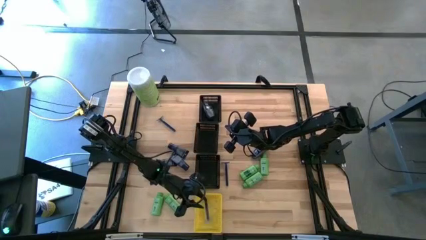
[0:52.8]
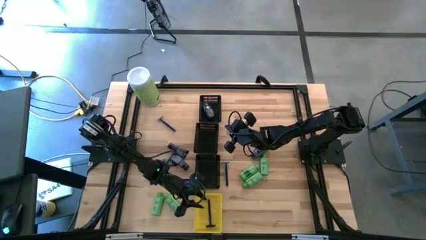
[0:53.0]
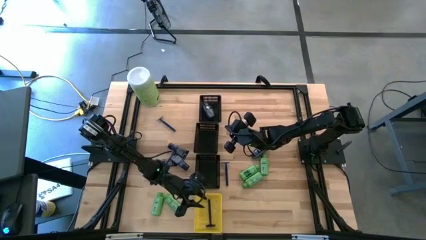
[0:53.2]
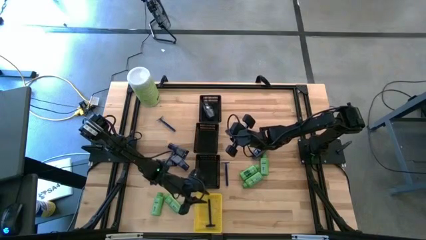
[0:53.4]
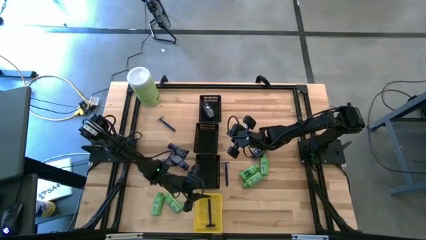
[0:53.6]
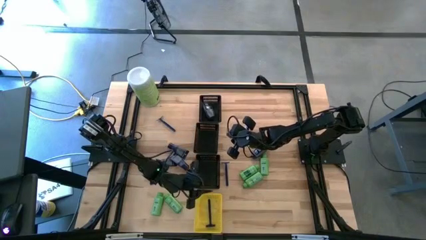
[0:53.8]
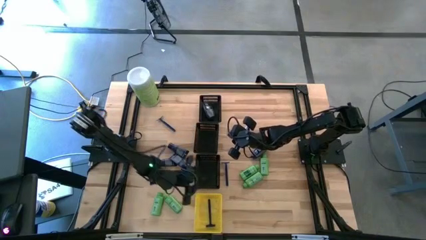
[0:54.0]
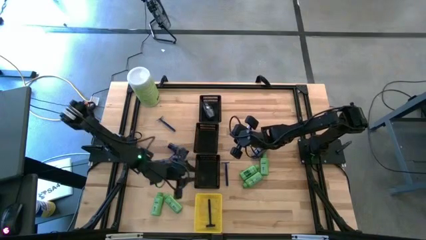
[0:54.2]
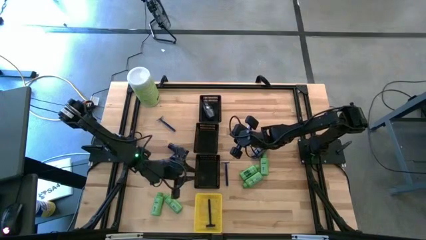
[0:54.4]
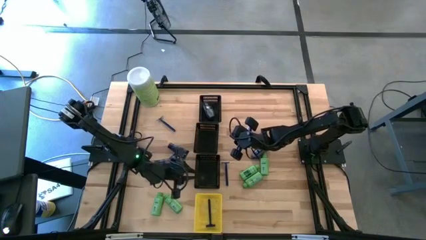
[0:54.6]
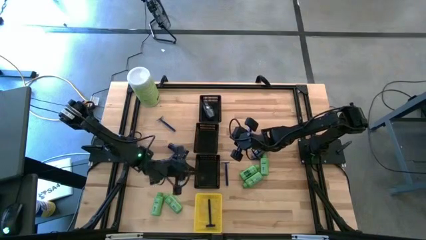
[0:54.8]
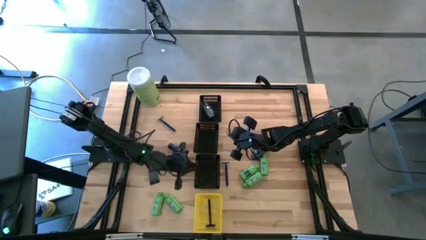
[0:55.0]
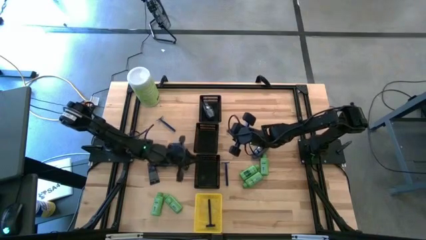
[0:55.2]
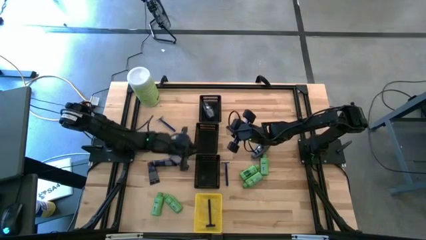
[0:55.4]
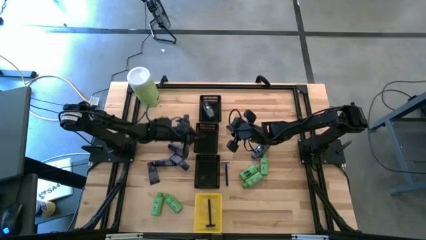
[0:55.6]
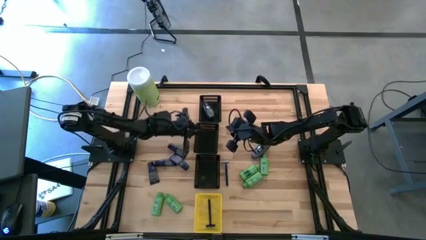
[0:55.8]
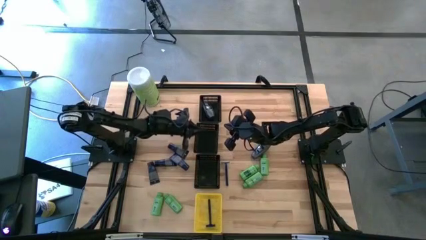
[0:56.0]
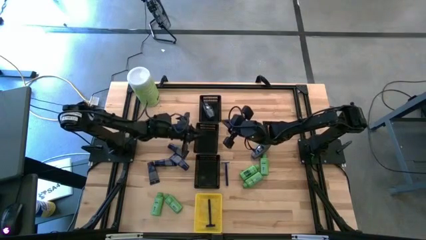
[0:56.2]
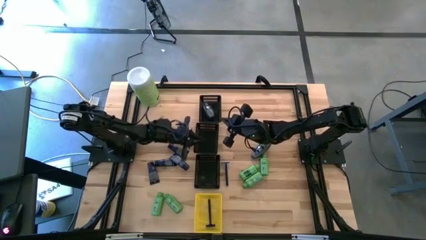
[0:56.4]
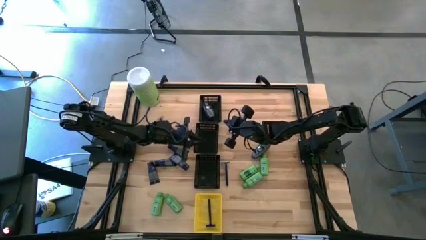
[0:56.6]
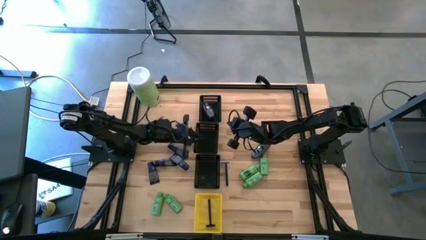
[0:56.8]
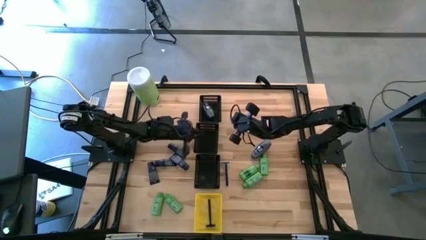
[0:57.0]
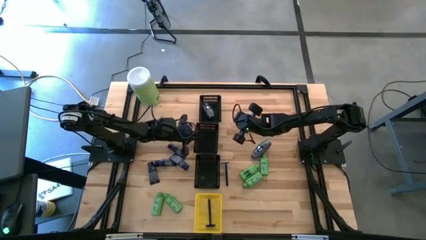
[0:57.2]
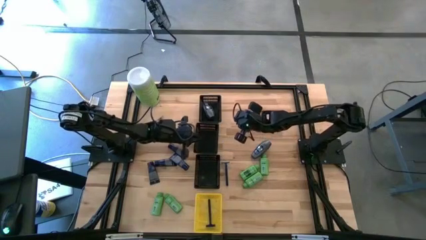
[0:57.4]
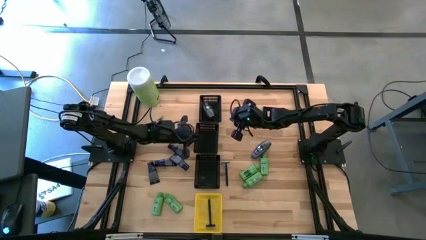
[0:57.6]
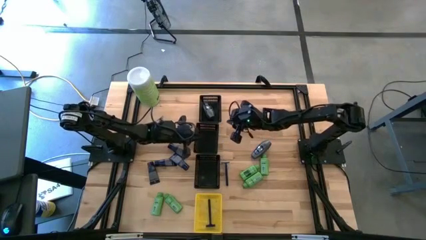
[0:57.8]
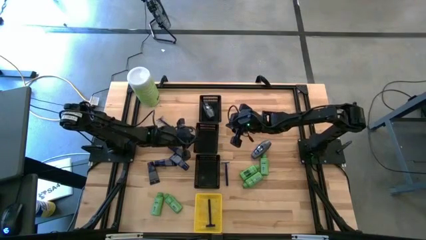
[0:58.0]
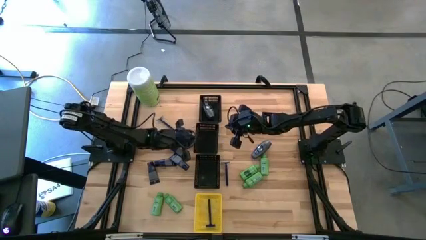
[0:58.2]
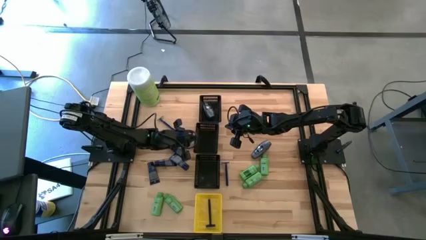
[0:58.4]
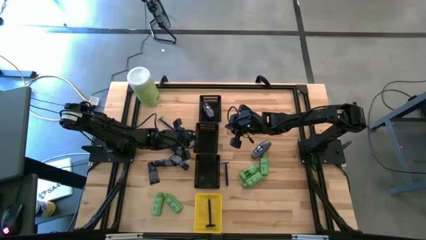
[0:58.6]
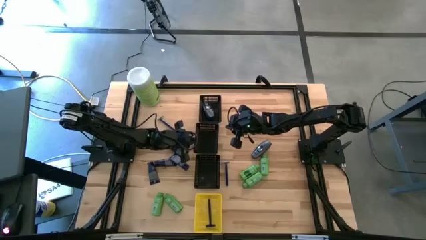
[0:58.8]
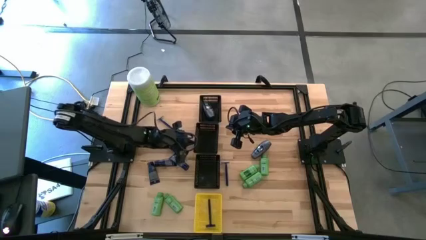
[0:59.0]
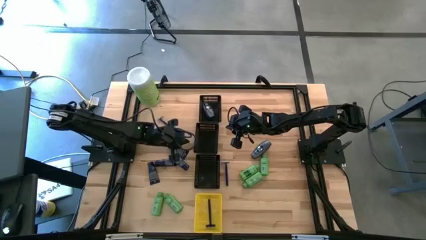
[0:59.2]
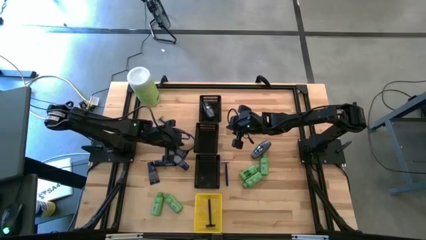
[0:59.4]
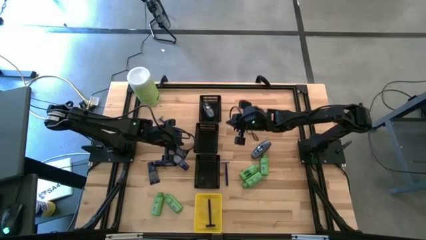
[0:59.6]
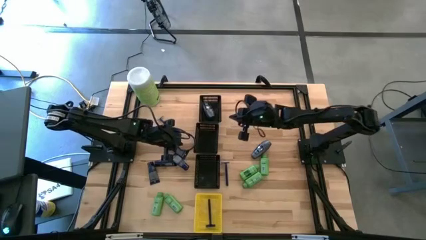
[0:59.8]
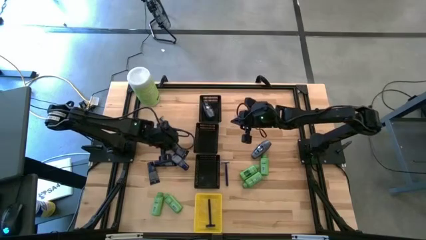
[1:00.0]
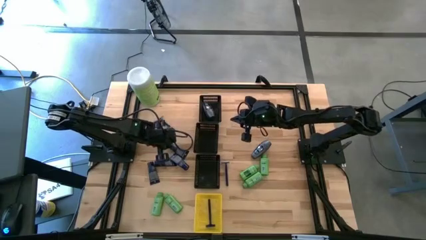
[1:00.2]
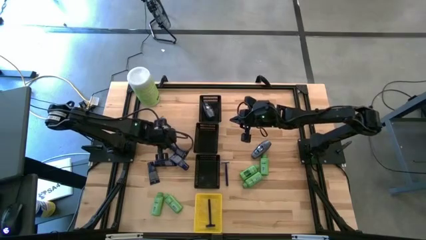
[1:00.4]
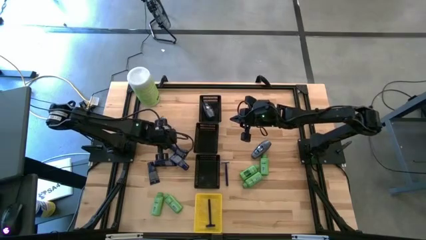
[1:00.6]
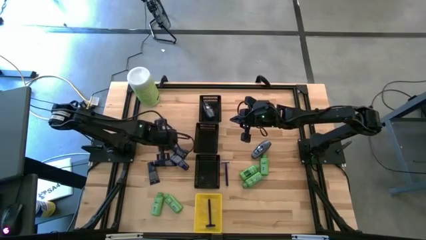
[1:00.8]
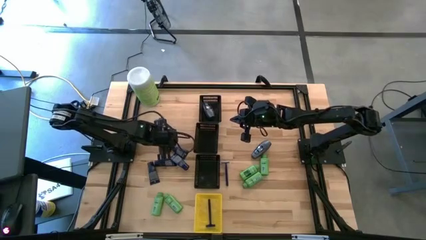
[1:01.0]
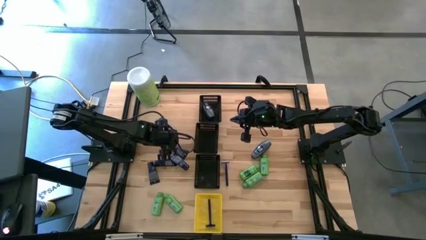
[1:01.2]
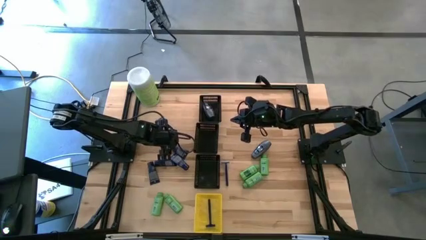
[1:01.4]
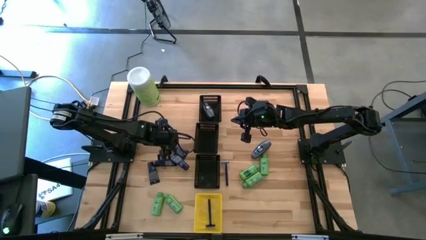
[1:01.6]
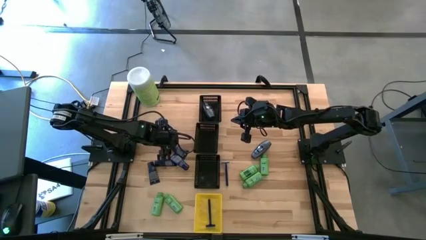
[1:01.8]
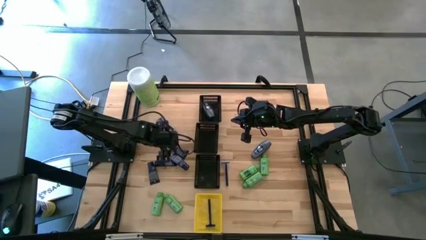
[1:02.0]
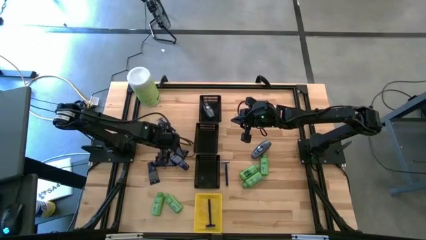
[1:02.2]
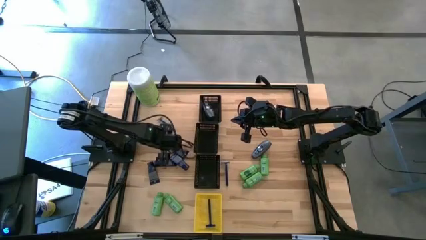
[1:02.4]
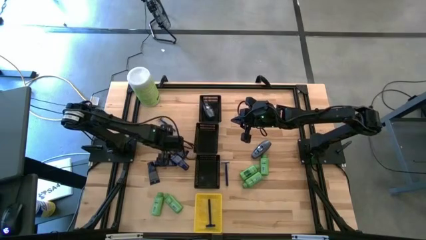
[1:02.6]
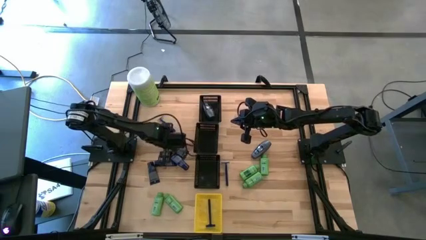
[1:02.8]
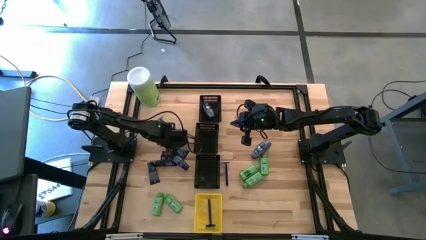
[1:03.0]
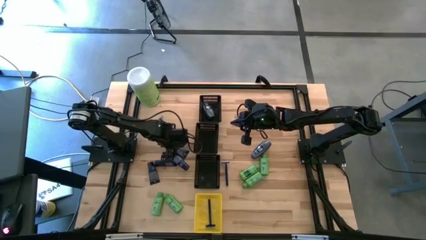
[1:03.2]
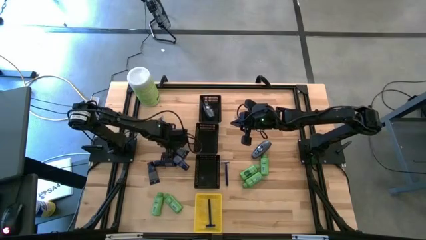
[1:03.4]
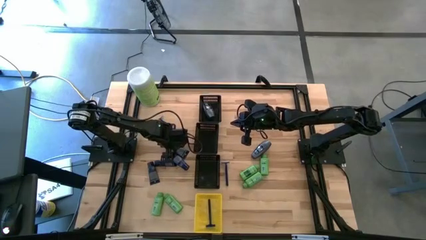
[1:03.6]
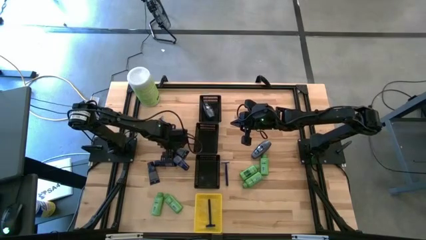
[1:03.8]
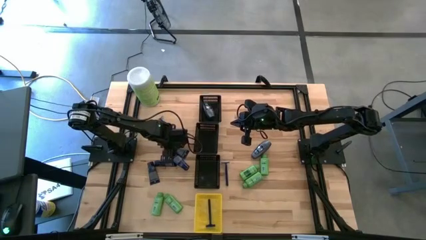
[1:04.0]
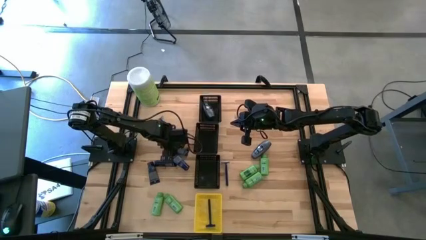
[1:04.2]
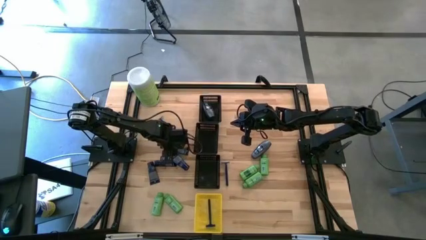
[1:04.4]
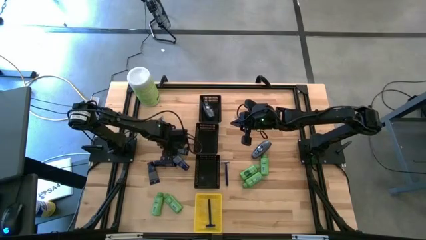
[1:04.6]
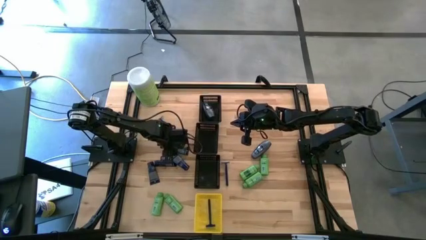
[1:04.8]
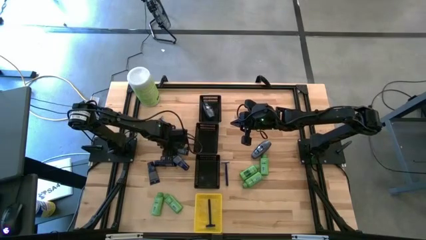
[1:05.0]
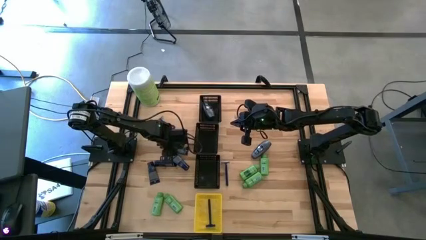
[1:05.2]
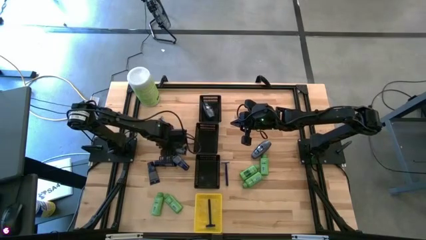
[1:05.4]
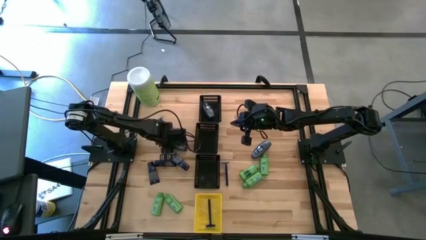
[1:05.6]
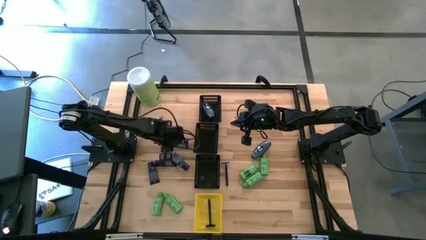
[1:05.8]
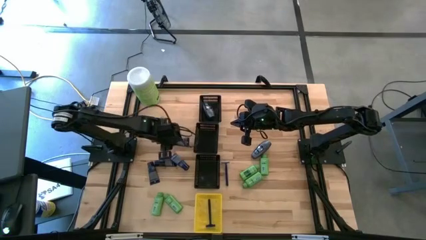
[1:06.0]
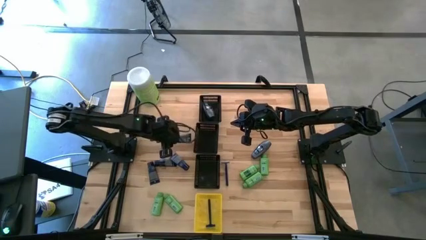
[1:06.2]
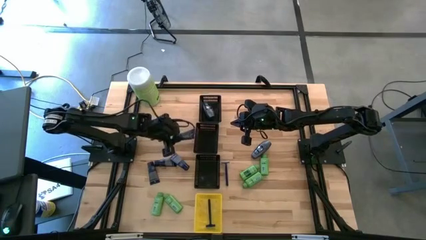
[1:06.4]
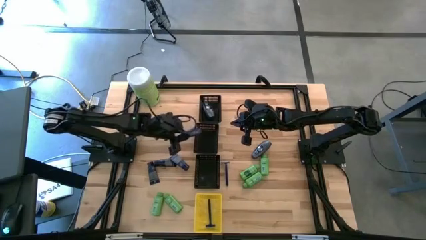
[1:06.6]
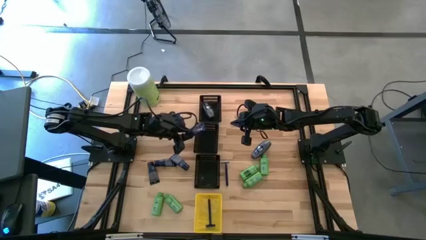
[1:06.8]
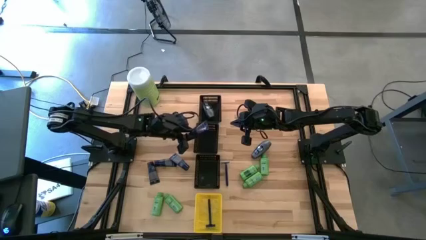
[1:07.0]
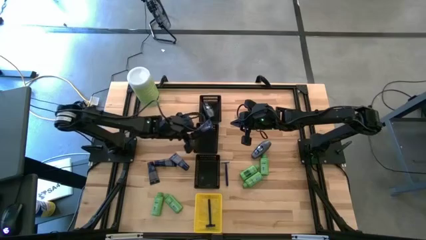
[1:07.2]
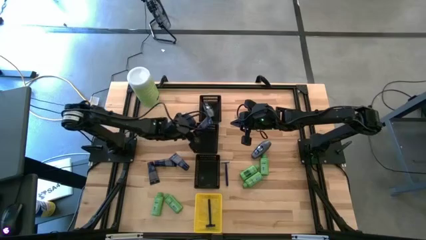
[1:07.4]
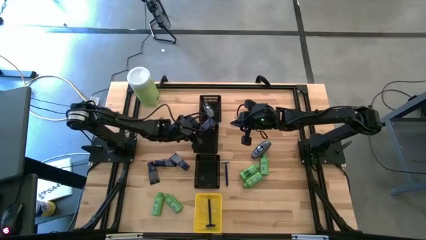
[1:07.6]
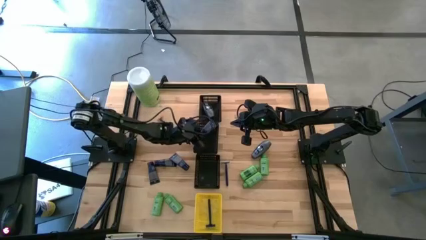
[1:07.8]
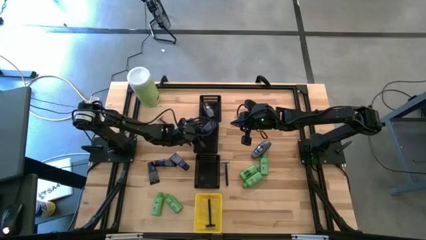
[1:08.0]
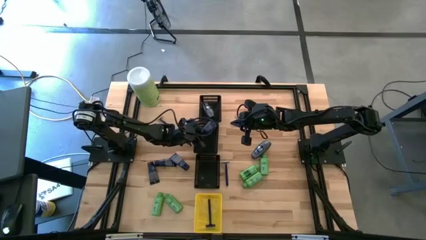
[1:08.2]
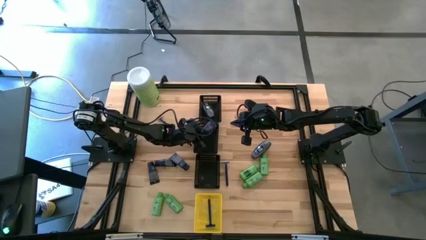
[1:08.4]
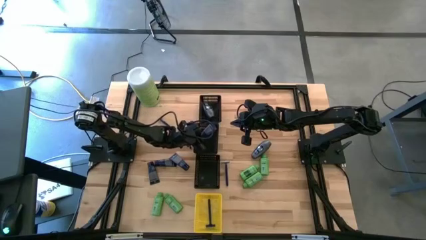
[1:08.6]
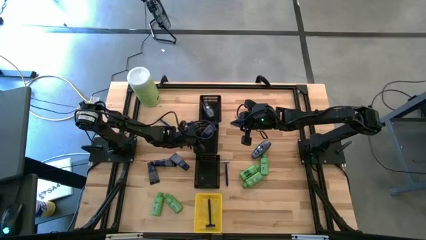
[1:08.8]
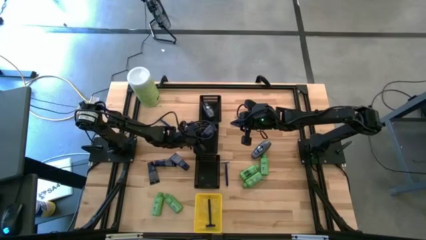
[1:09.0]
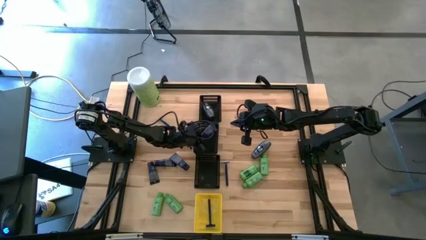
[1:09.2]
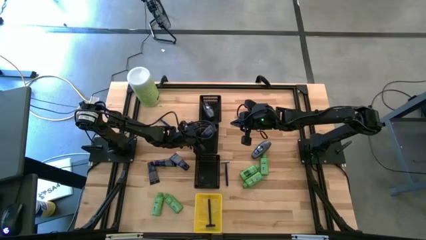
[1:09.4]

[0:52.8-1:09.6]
Task: Pick & Place Travel size toiletries
Put the dark blue shave butter bottle into the center black bin
